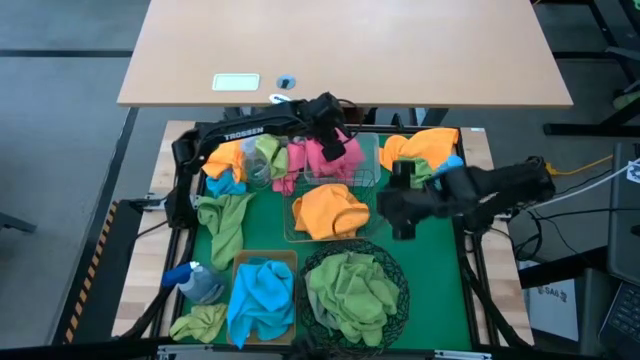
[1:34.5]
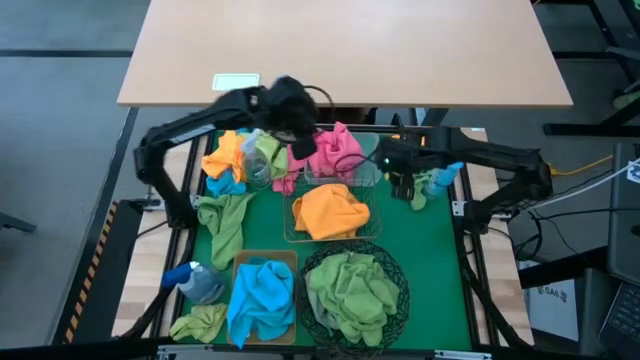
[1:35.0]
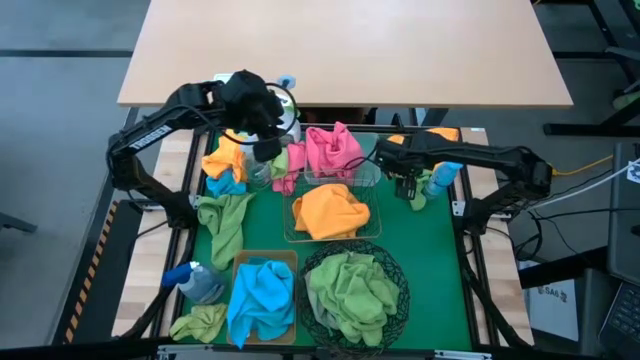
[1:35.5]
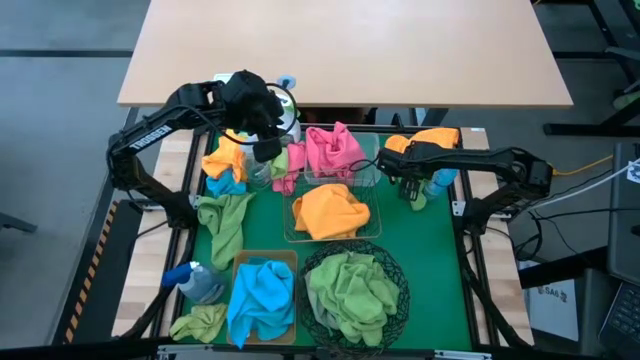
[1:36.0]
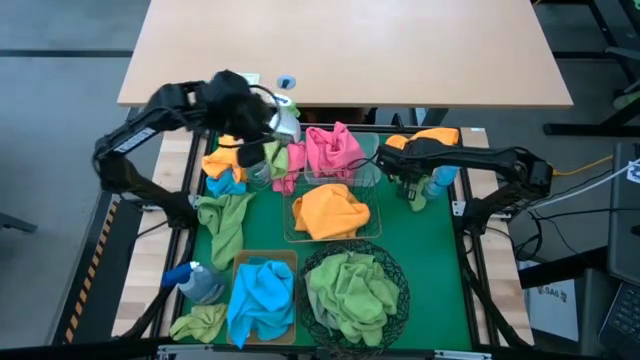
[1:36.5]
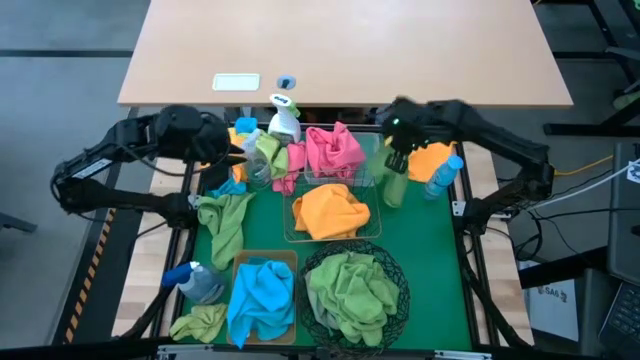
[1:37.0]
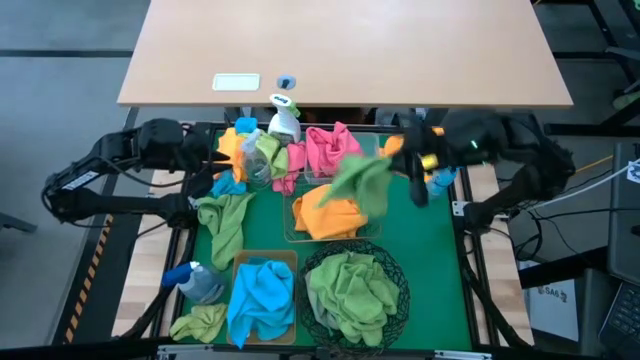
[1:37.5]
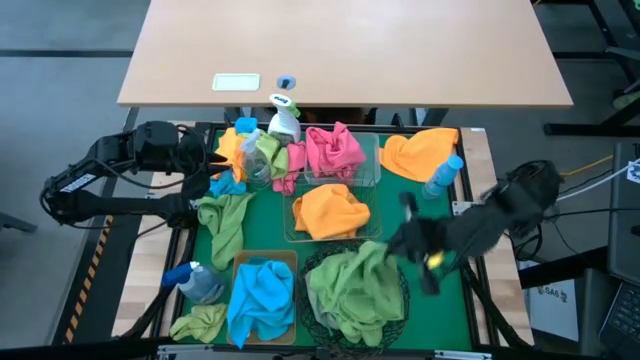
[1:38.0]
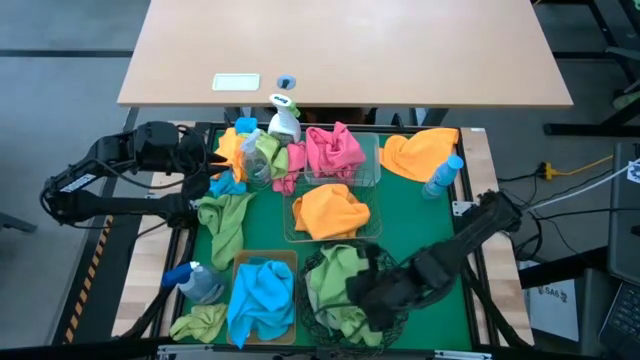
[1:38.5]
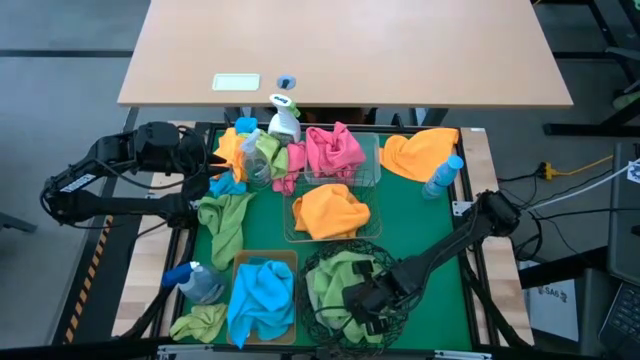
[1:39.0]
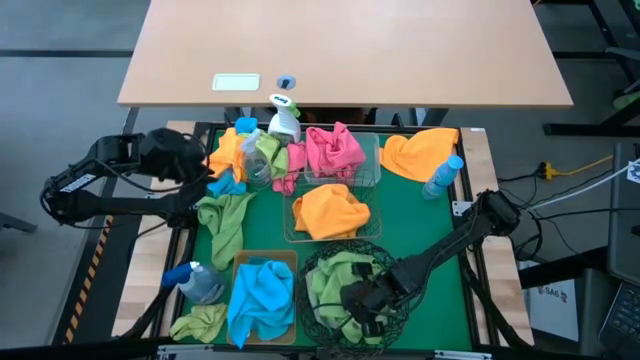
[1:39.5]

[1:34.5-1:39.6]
Task: Sort microfiber towel by color & place in baskets
Put the green microfiber towel into the black wire basket

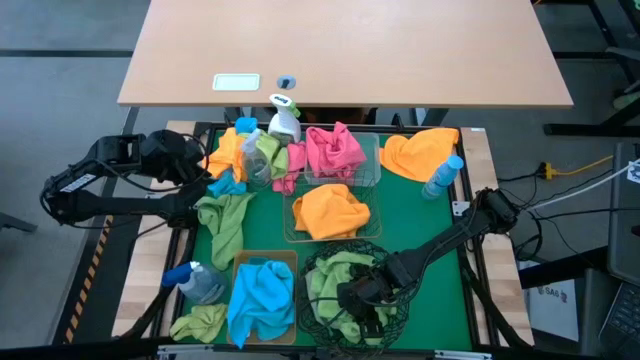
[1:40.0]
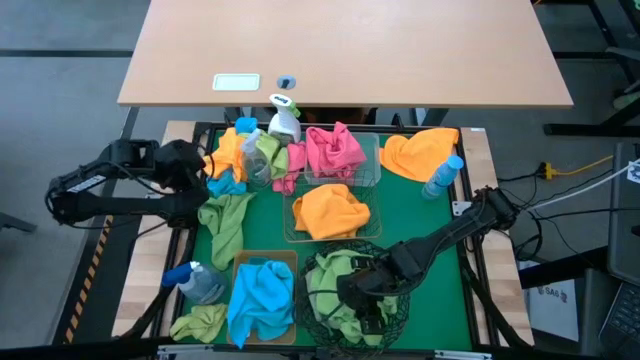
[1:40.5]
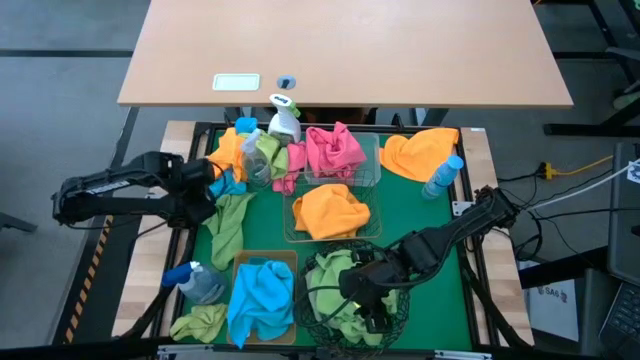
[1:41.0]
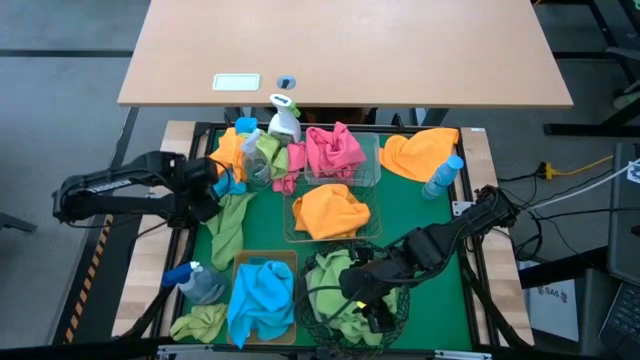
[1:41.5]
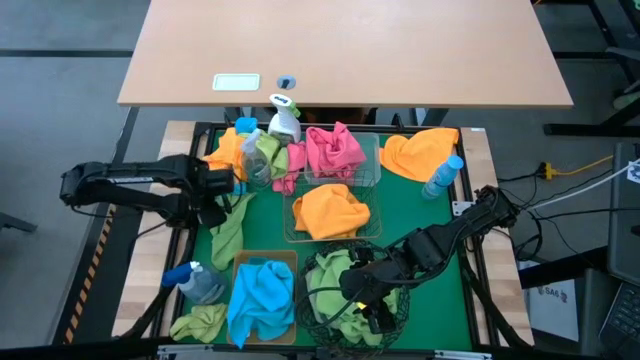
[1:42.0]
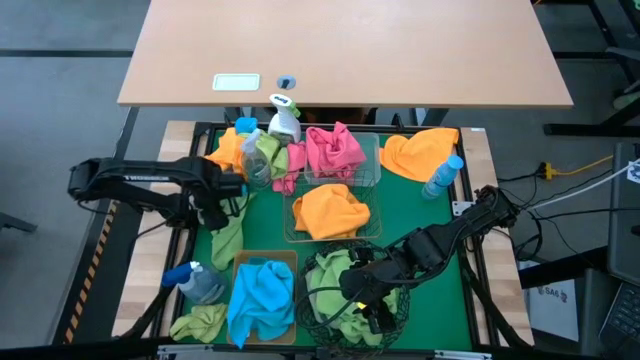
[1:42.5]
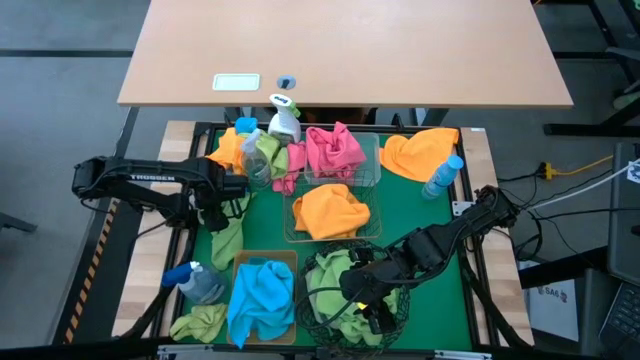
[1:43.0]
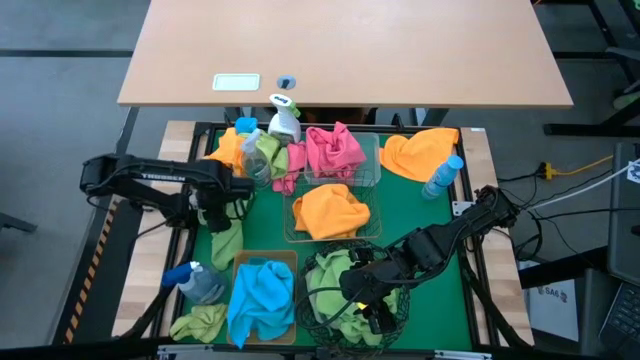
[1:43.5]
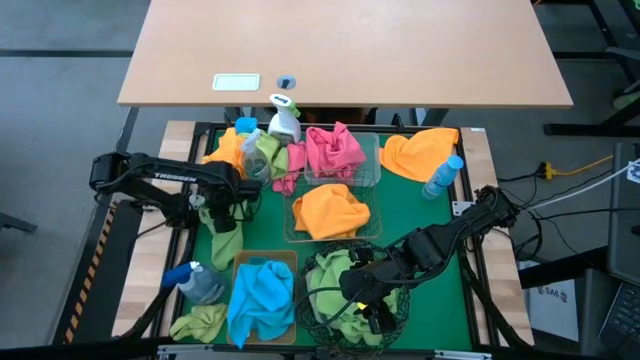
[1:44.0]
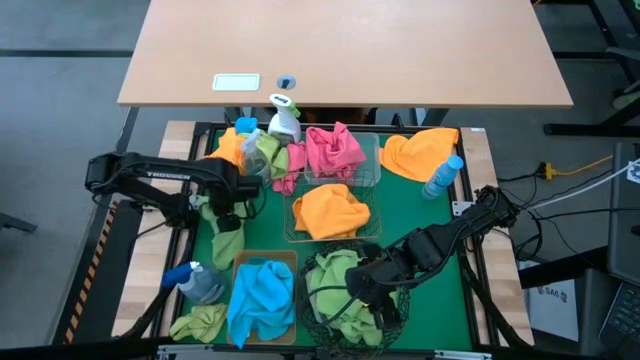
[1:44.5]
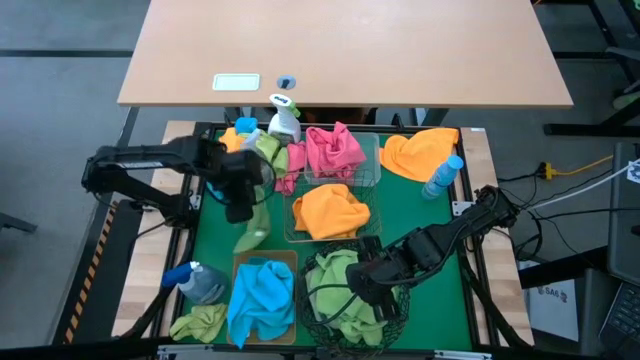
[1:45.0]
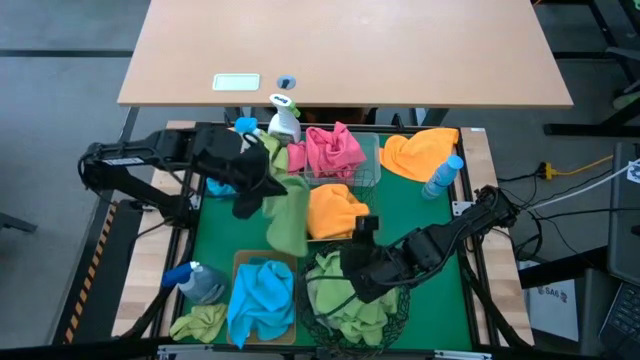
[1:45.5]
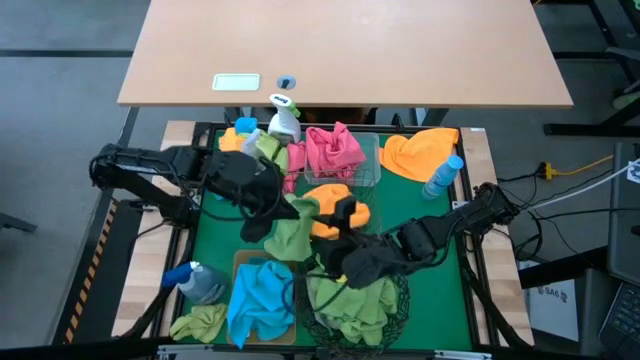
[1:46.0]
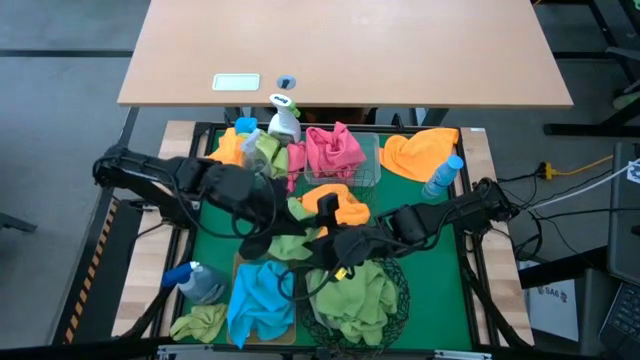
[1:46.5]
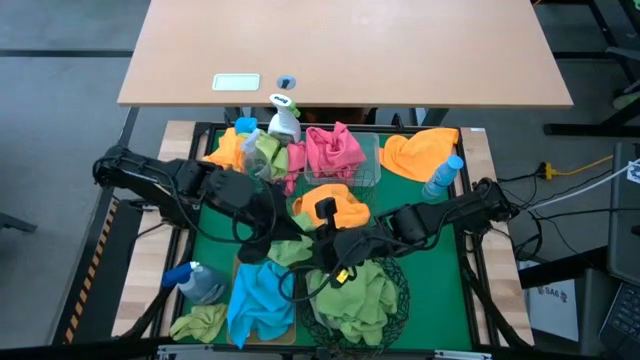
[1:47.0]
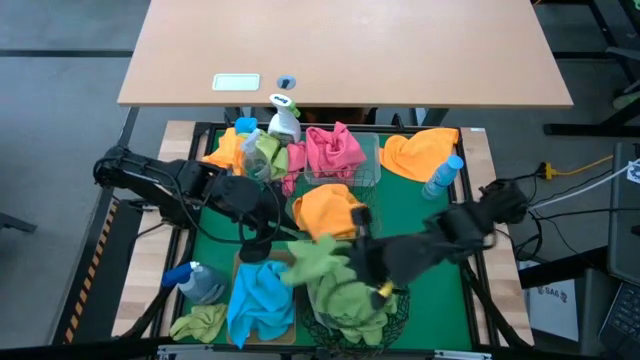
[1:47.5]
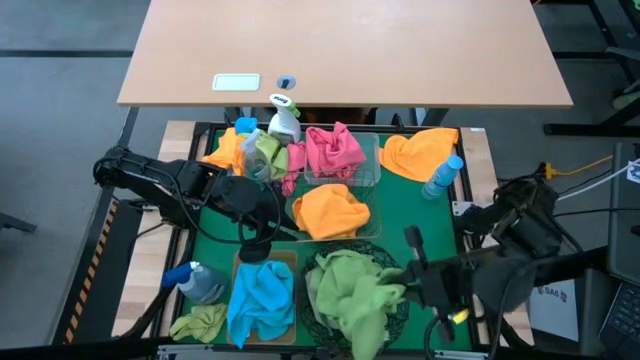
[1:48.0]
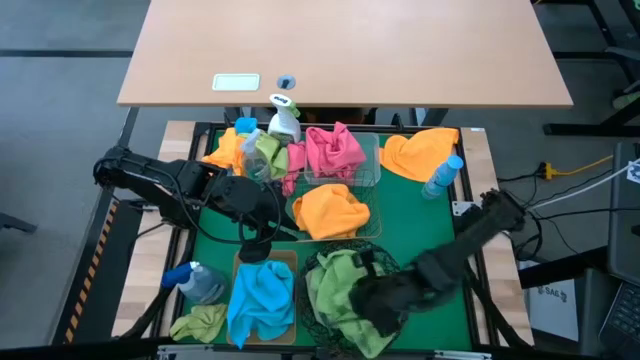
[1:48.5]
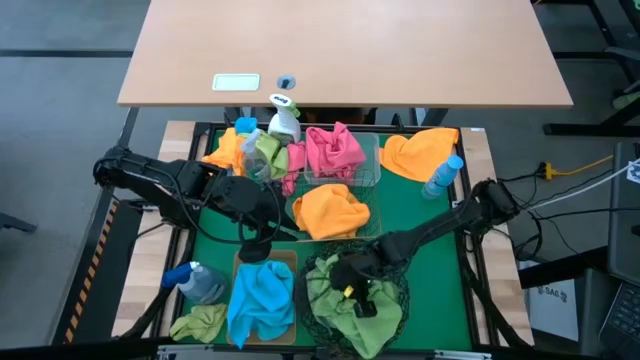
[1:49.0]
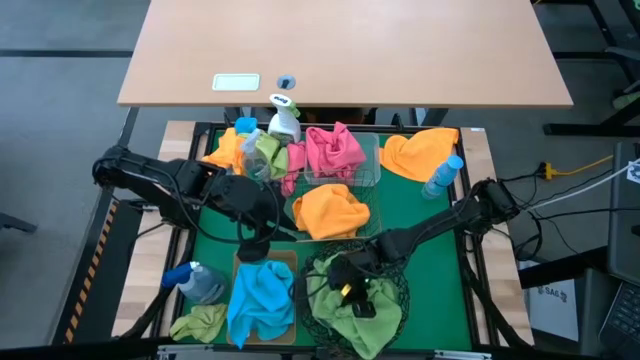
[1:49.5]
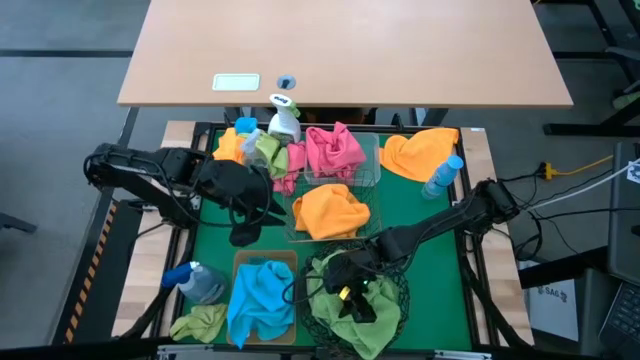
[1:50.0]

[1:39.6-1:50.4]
Put the green microfiber towel into the black wire basket

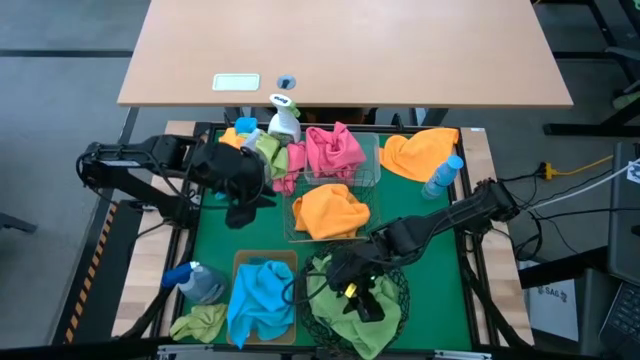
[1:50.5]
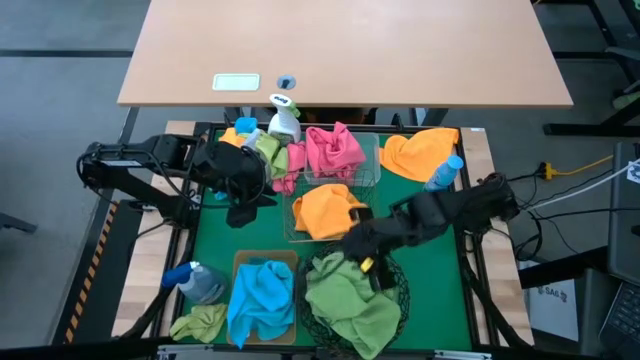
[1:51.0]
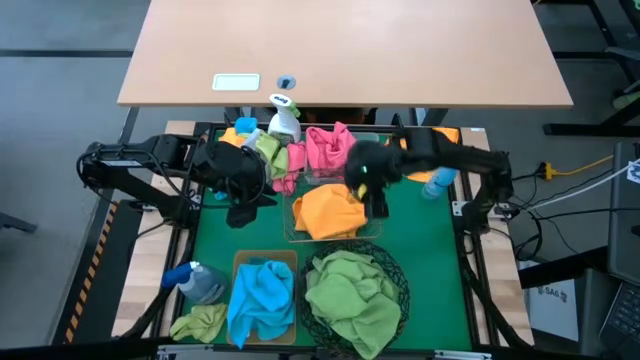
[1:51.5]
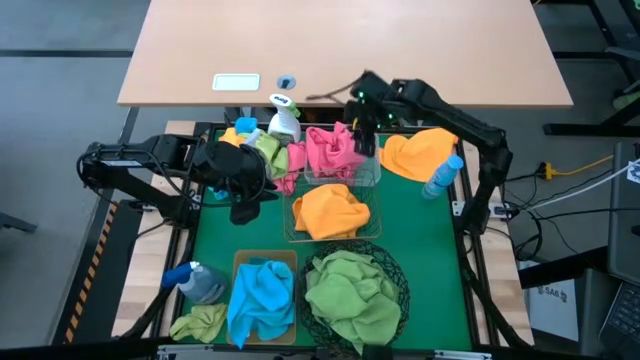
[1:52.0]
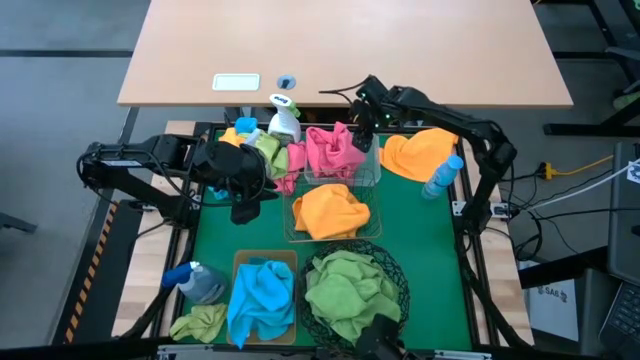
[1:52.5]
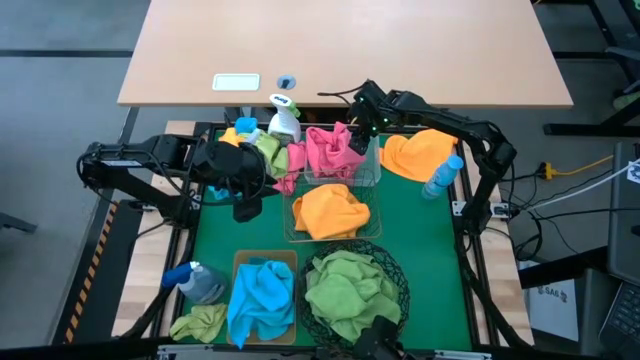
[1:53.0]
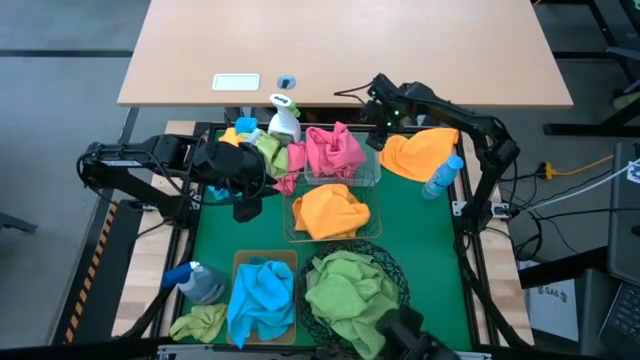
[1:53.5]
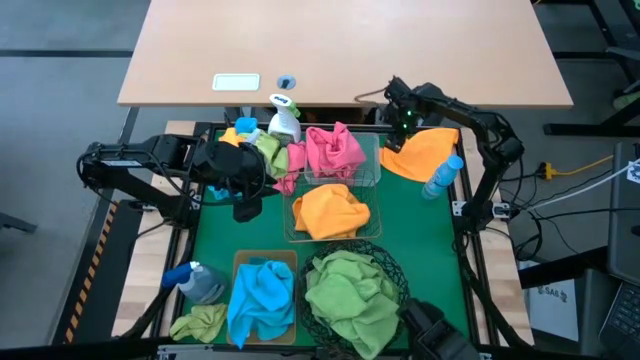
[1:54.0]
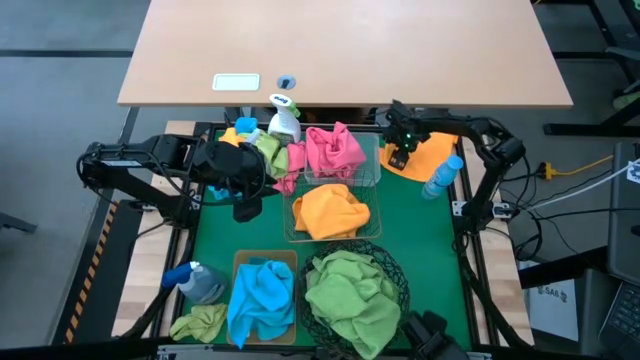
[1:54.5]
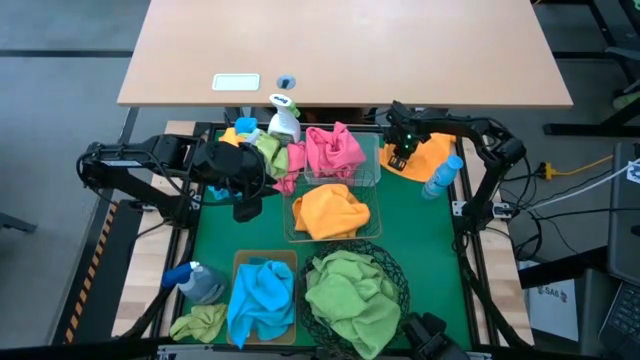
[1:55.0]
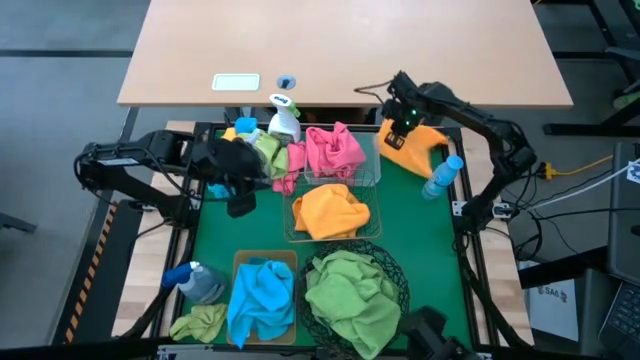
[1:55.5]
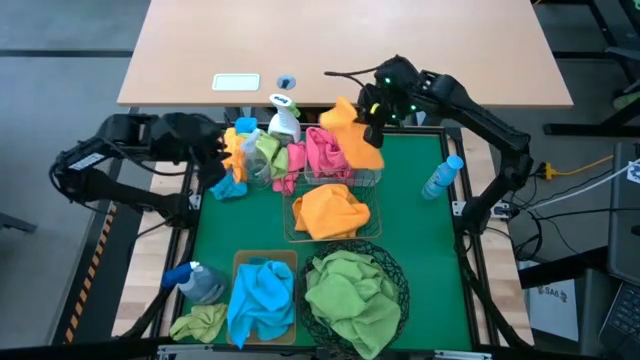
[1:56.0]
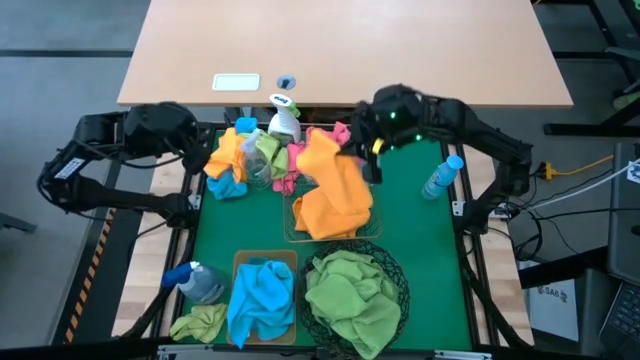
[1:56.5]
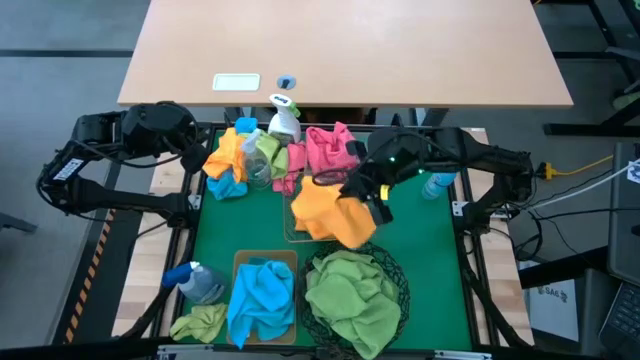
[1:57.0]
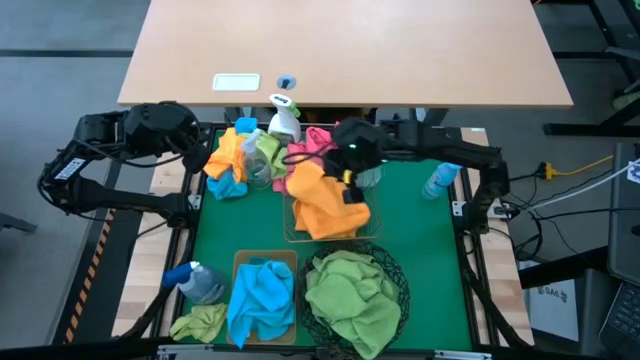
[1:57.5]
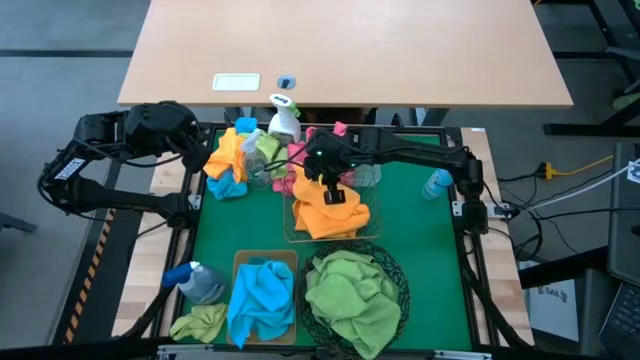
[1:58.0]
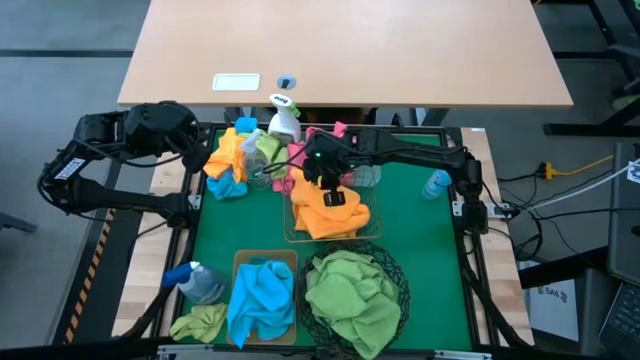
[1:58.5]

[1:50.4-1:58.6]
Put the orange microfiber towel into the gold wire basket
